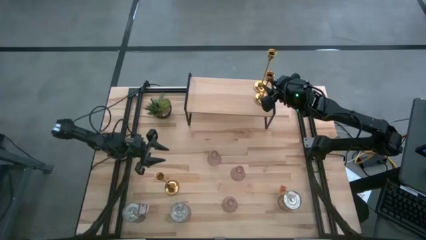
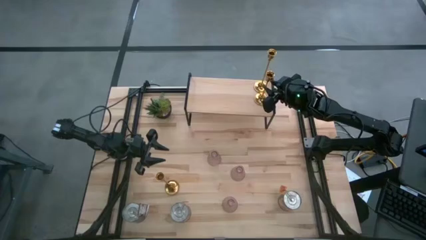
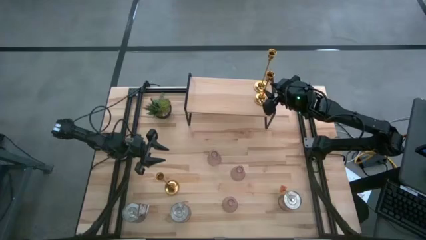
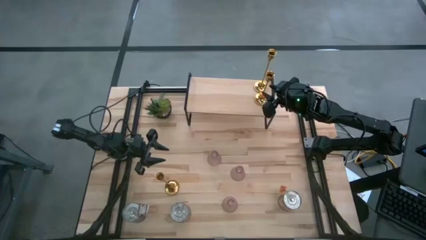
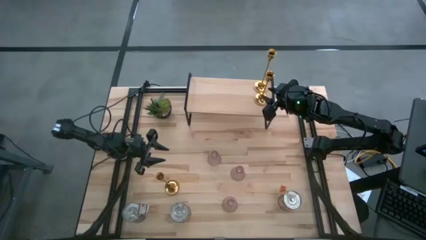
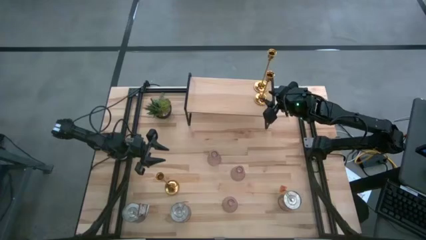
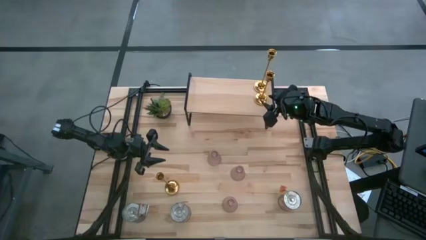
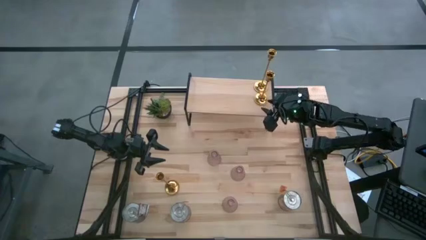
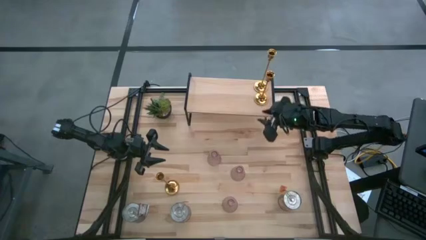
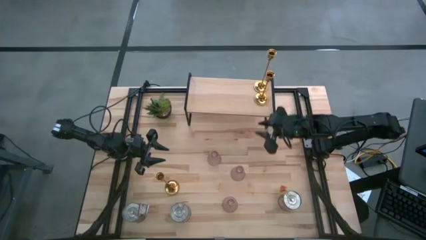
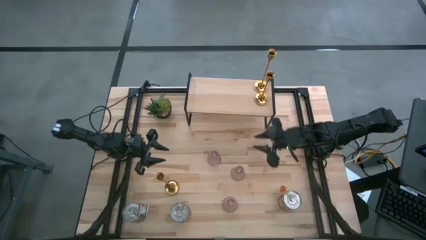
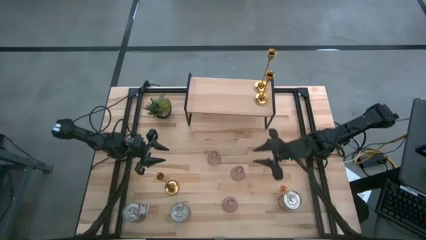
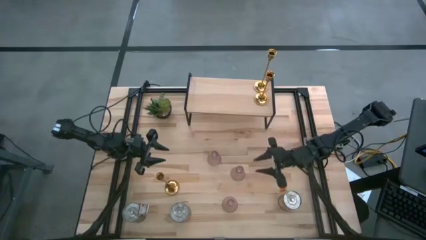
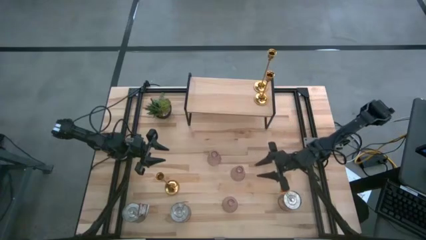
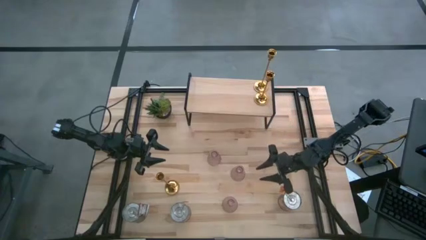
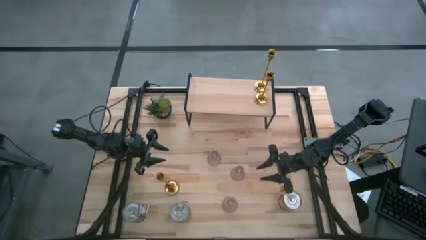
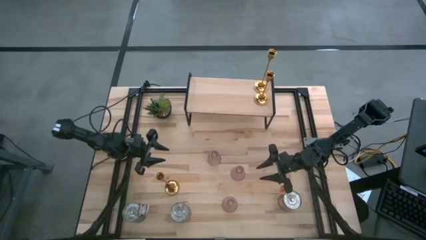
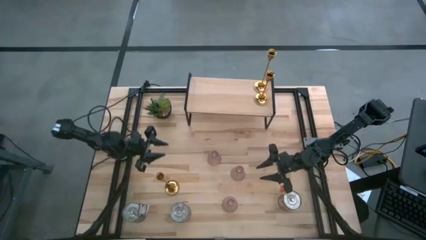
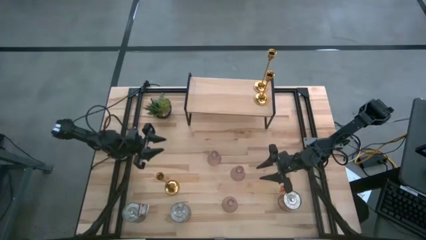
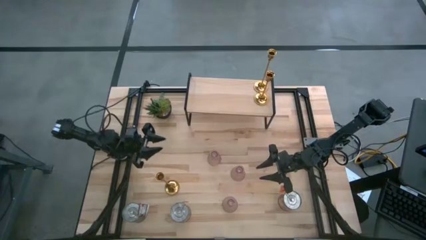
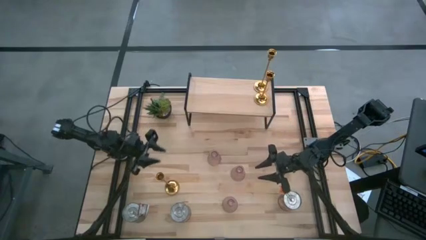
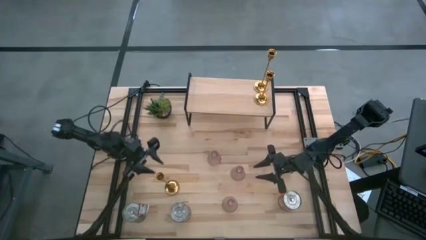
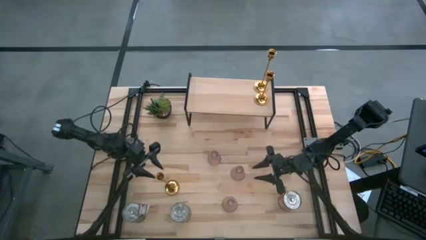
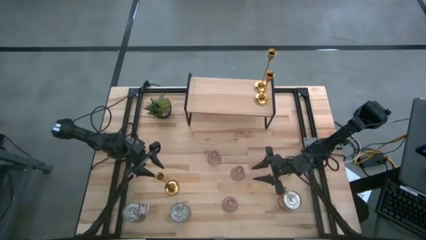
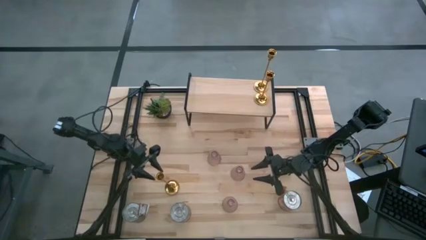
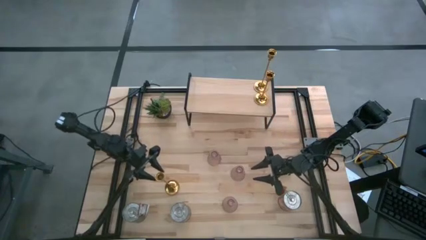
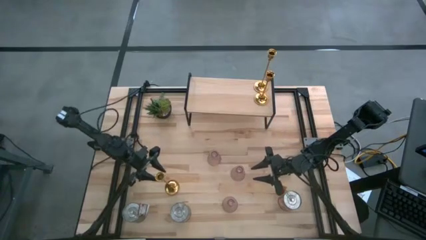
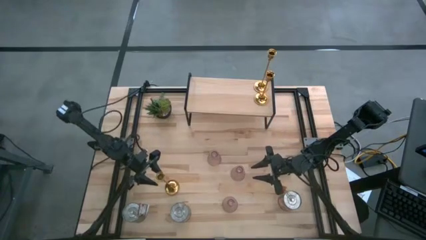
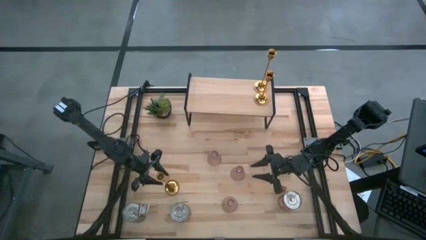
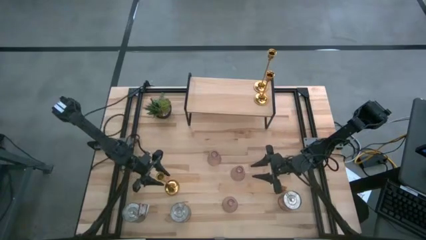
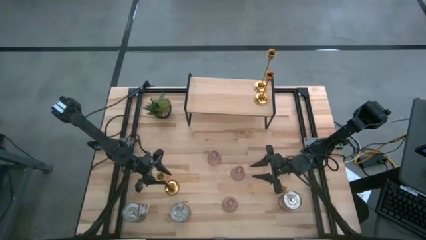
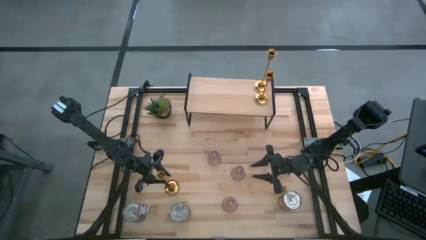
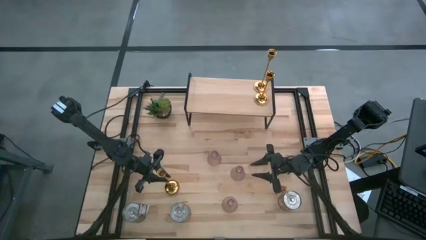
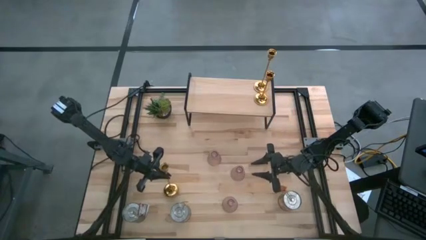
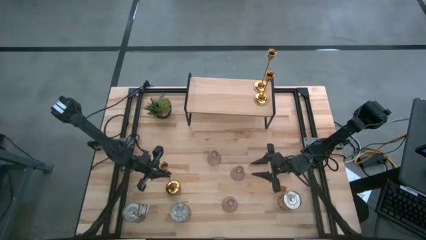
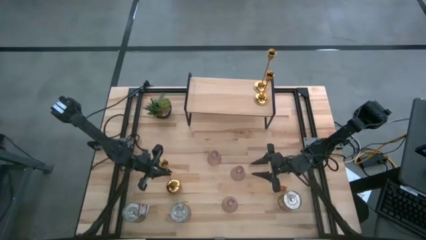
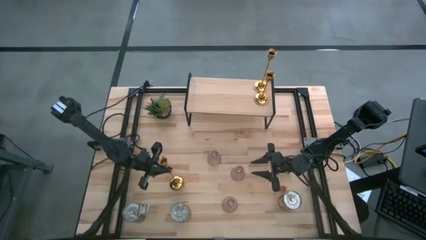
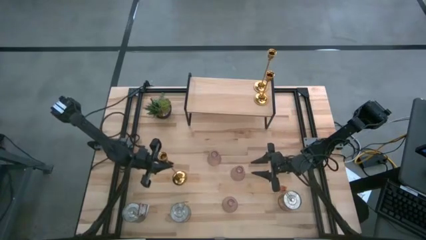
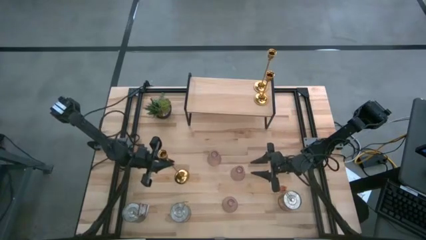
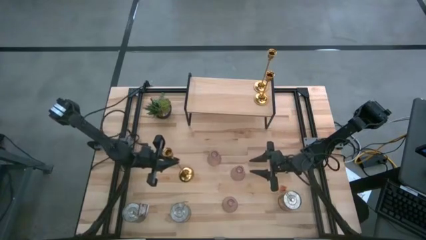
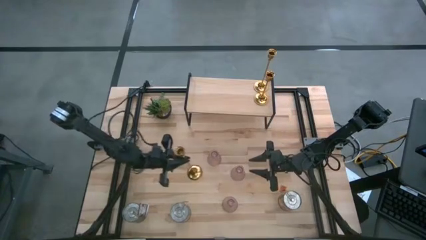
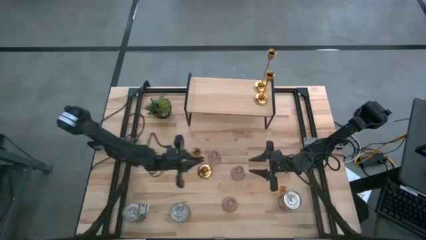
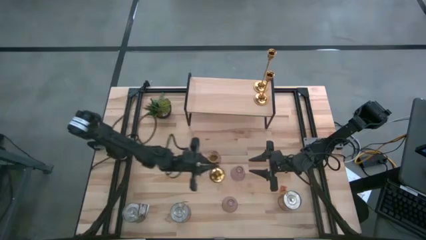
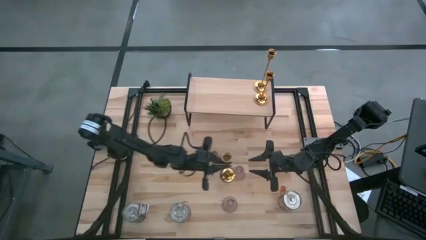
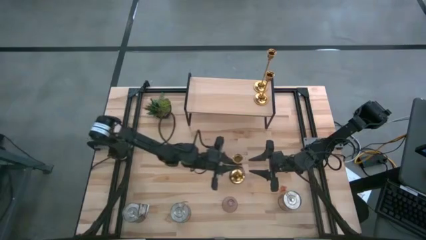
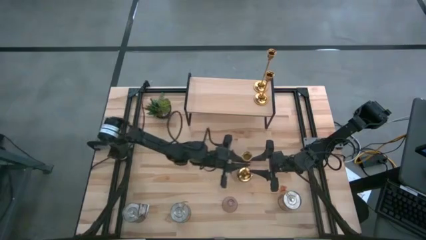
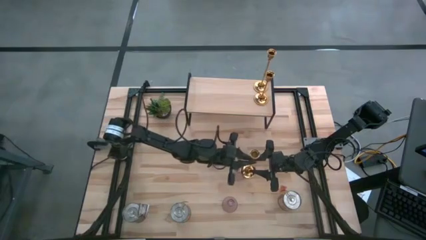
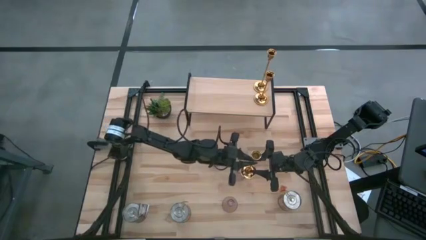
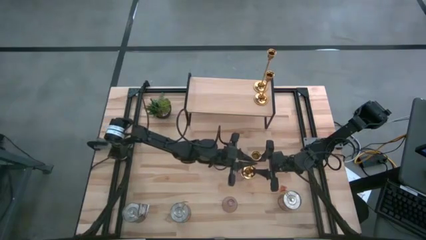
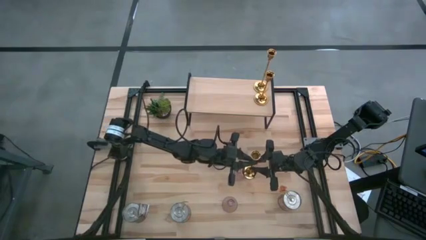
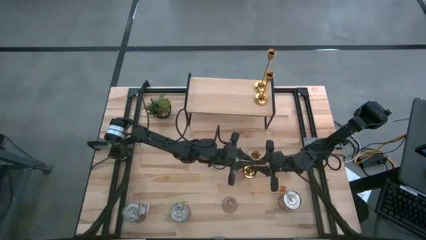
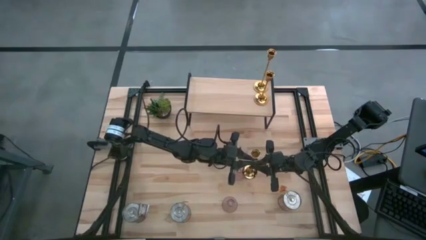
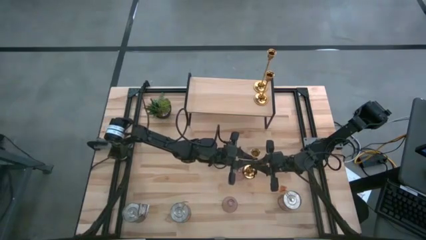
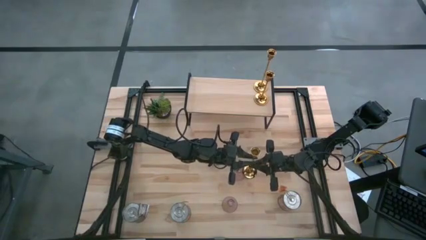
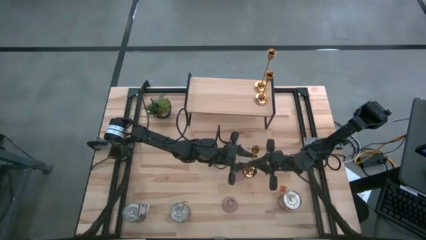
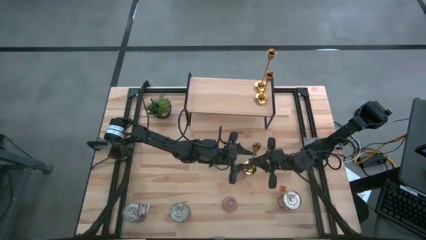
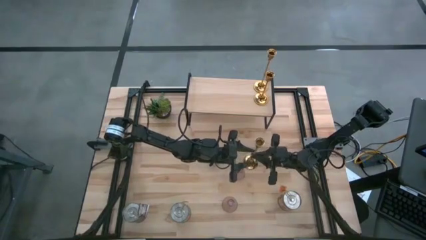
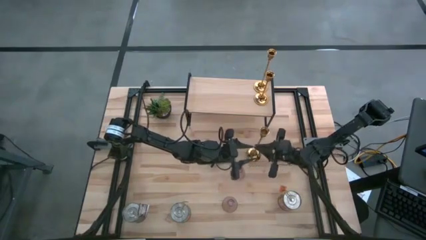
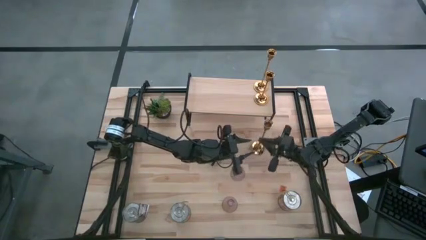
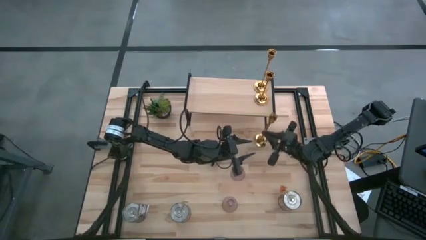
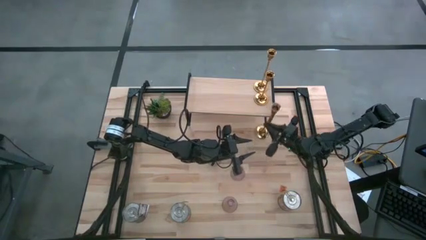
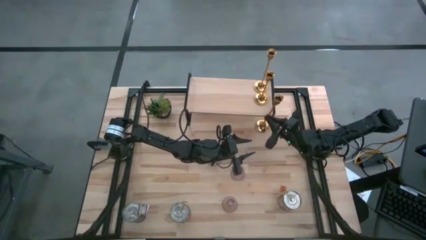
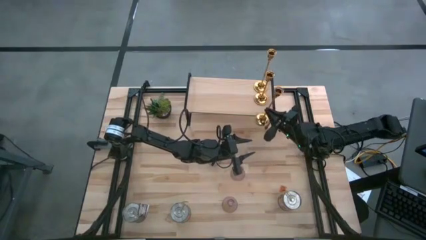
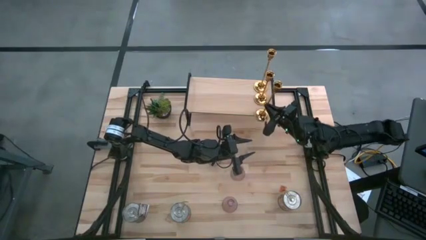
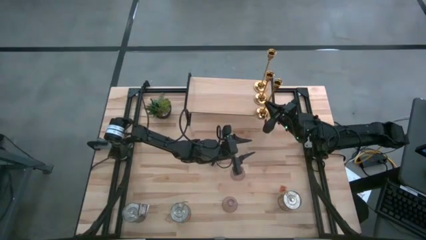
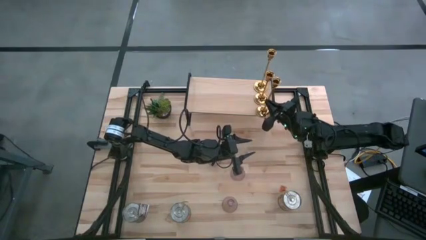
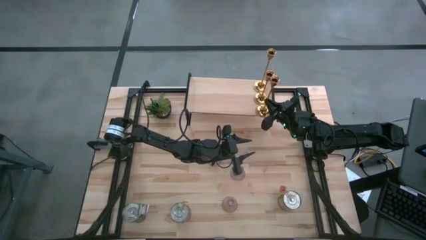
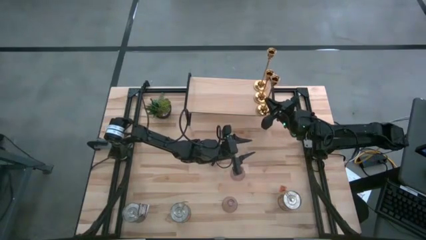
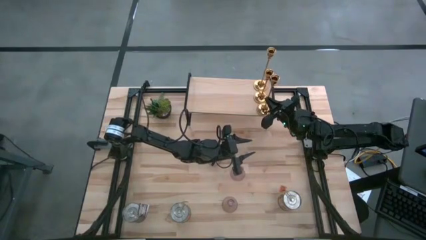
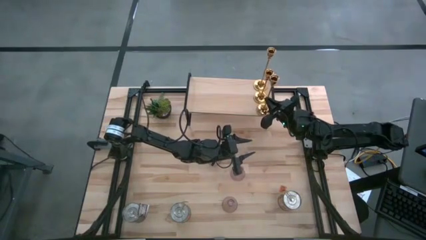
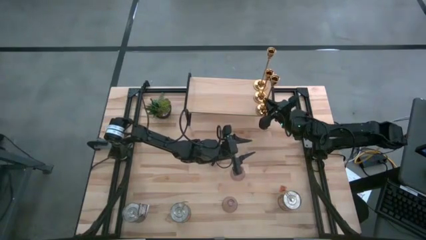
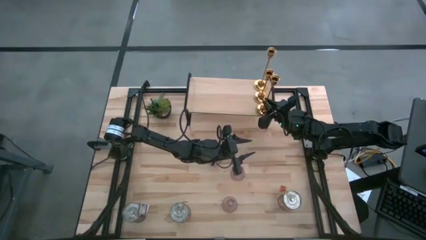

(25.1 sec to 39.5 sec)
Task: Pick & Place candle stick holders
Align the gold candle holder on the shelf with the gold candle holders
